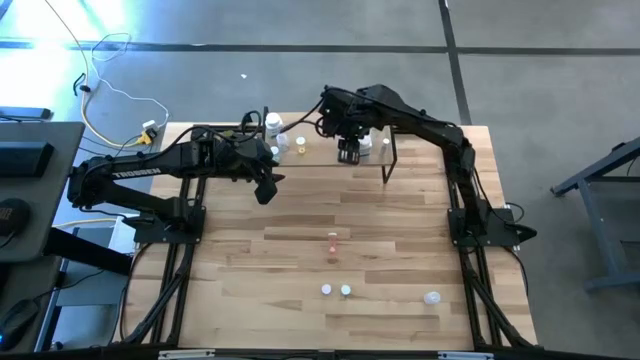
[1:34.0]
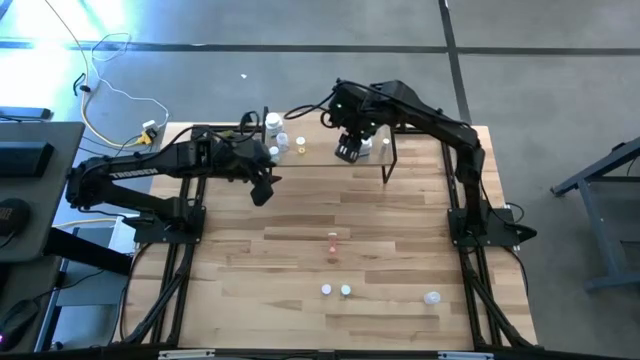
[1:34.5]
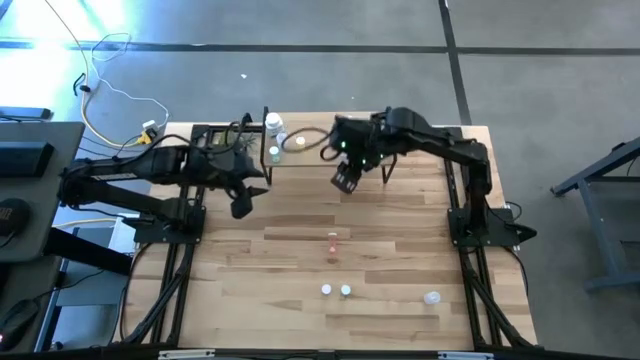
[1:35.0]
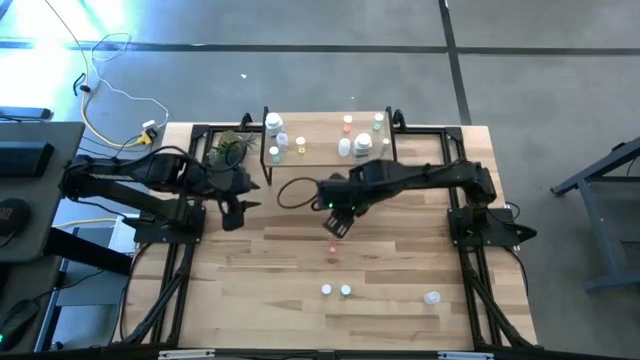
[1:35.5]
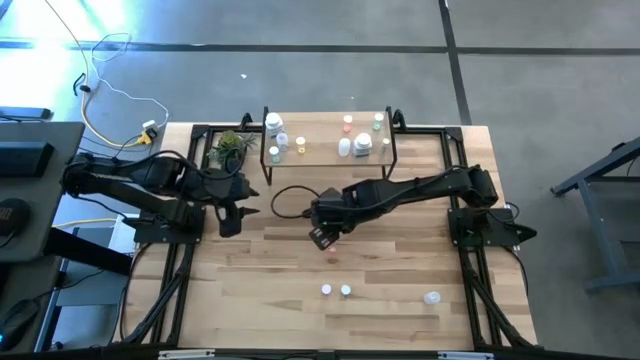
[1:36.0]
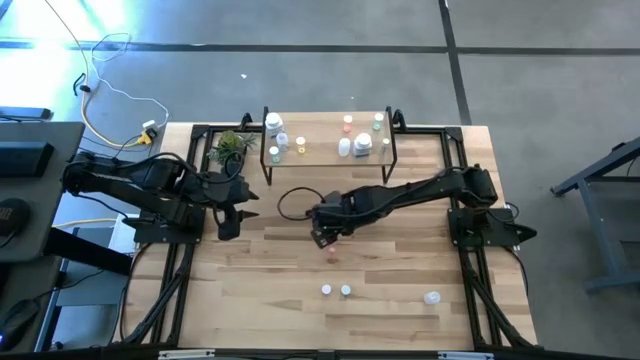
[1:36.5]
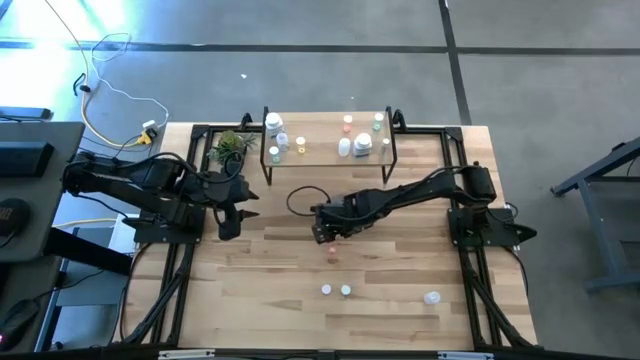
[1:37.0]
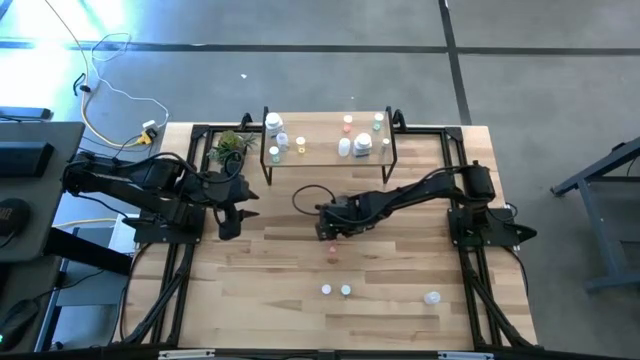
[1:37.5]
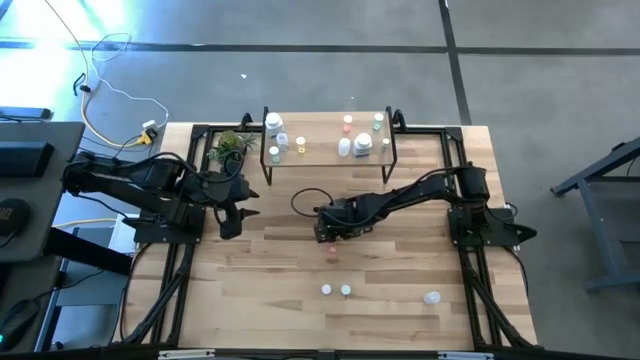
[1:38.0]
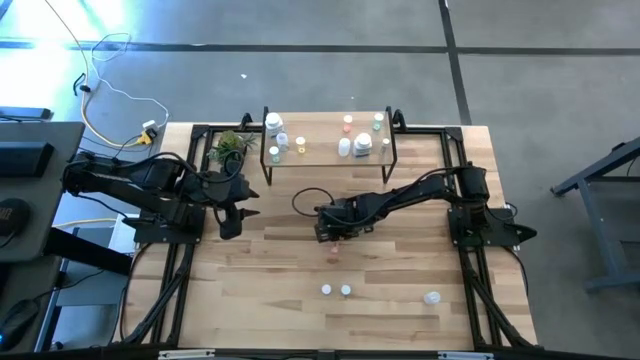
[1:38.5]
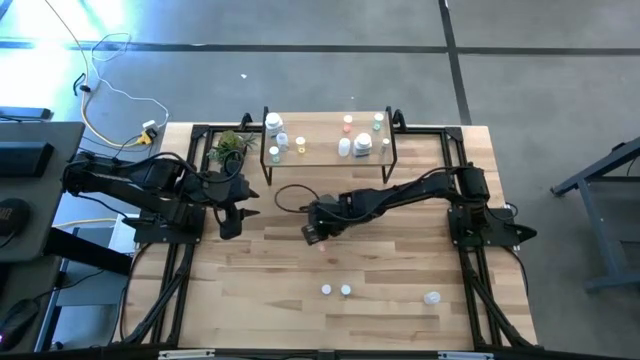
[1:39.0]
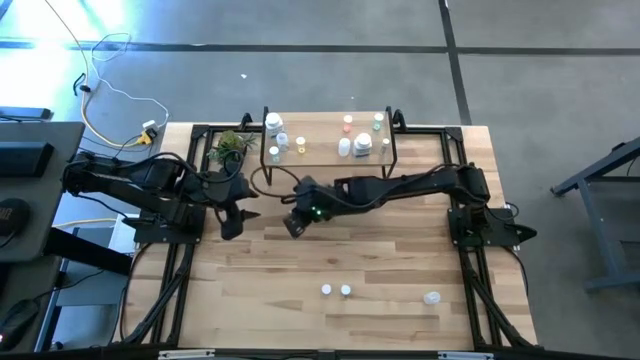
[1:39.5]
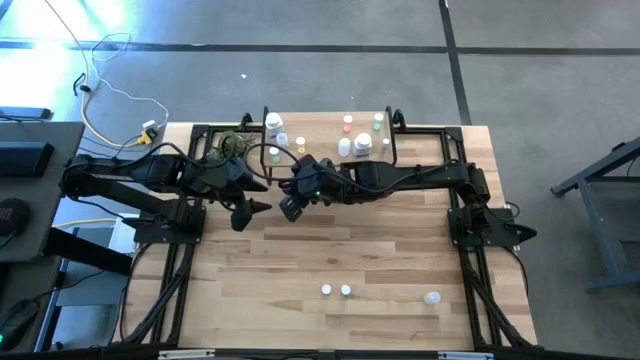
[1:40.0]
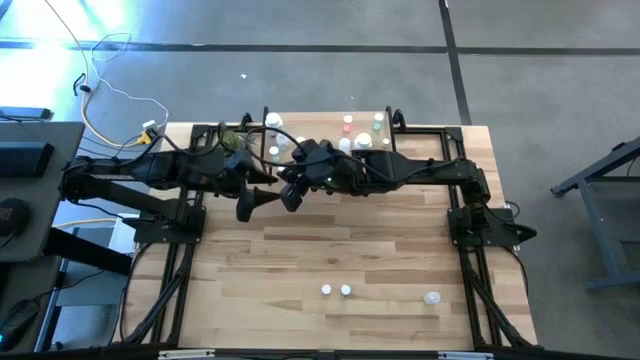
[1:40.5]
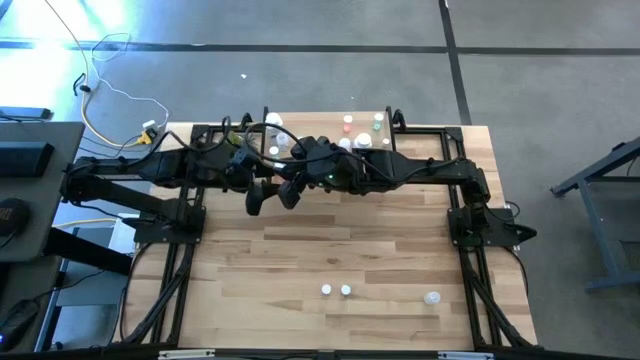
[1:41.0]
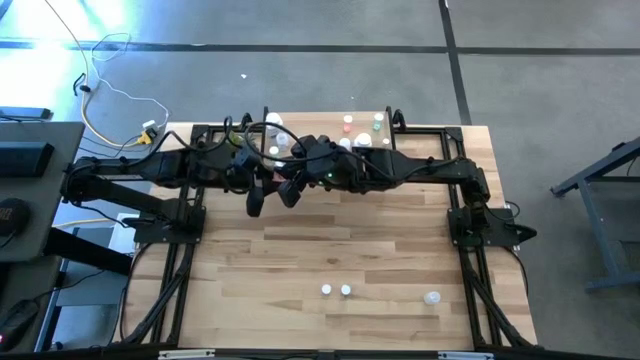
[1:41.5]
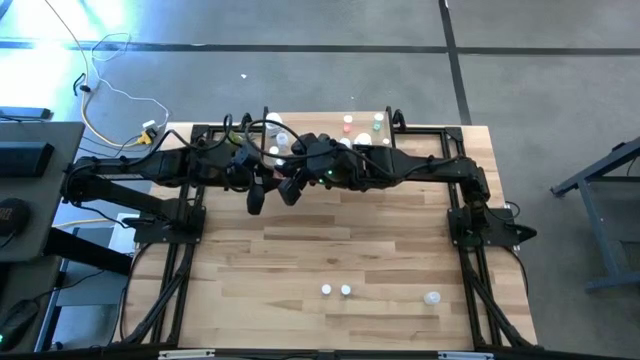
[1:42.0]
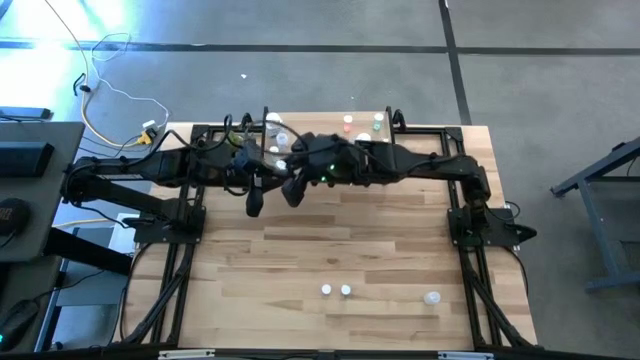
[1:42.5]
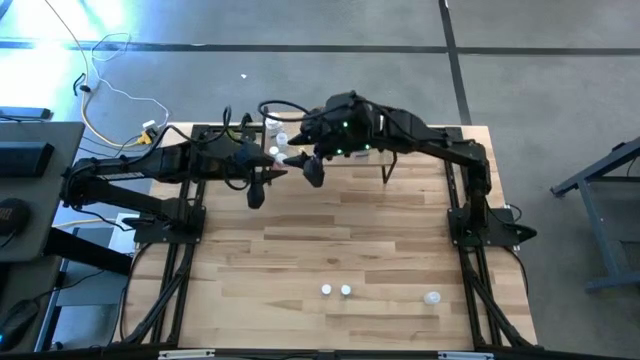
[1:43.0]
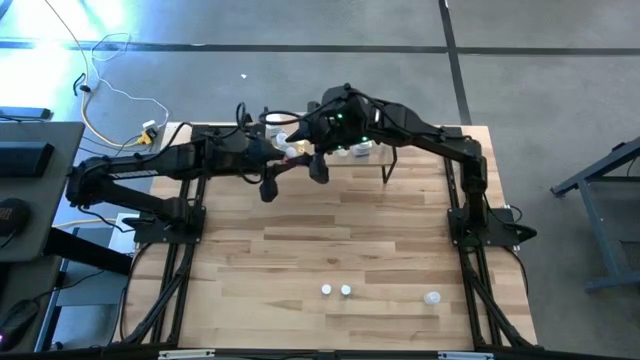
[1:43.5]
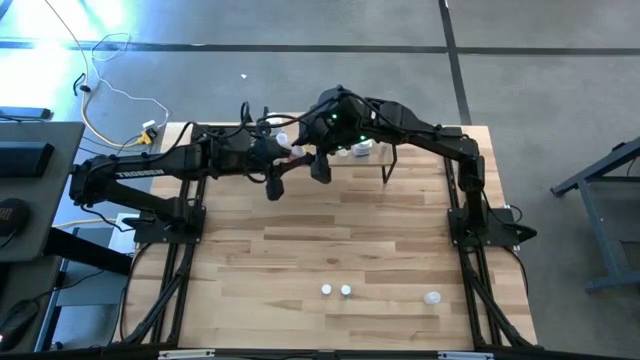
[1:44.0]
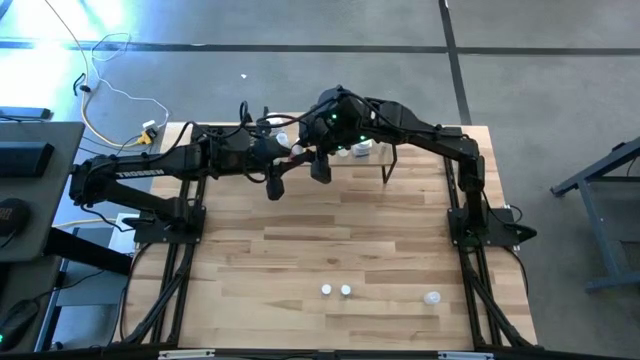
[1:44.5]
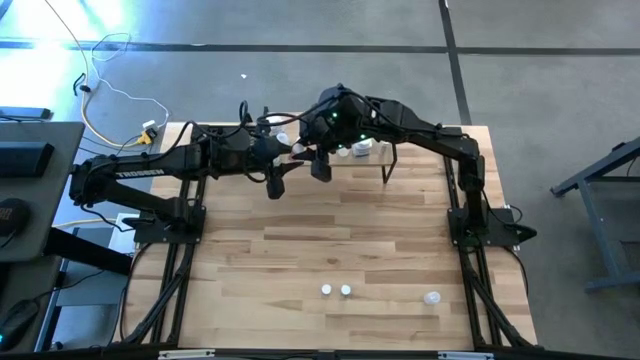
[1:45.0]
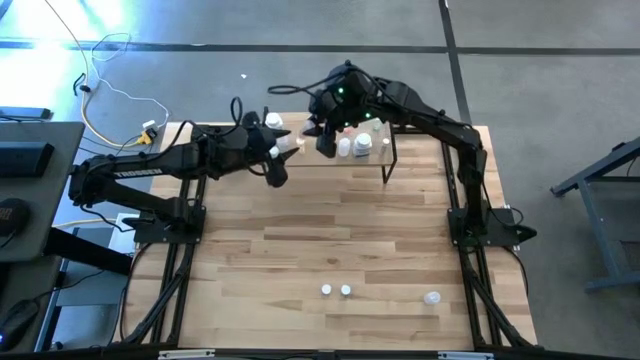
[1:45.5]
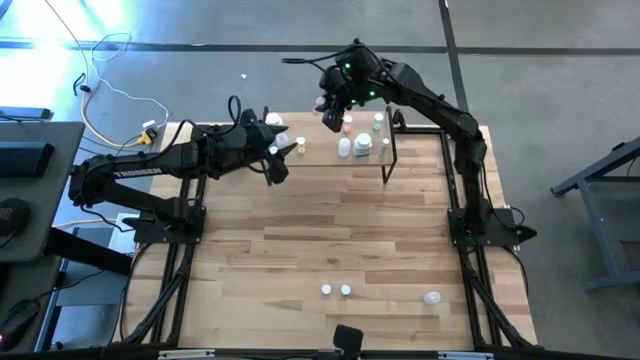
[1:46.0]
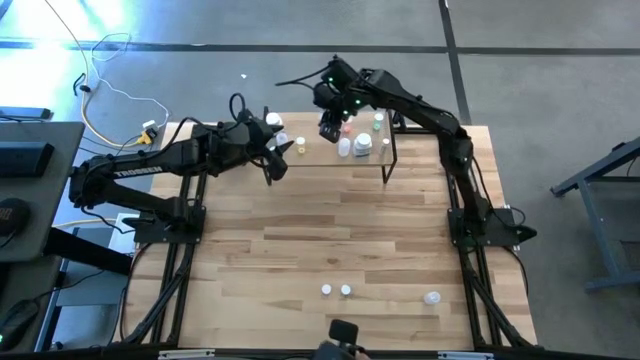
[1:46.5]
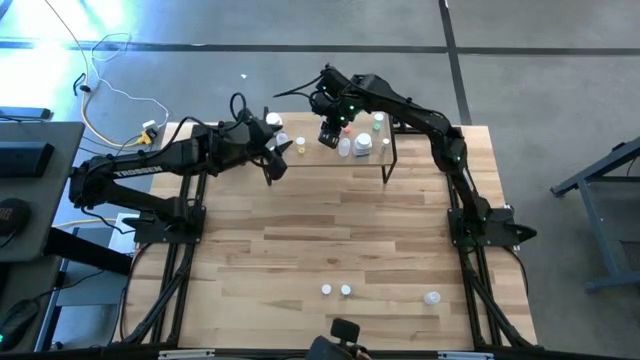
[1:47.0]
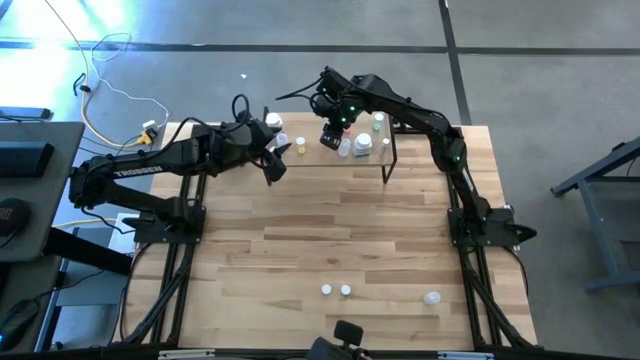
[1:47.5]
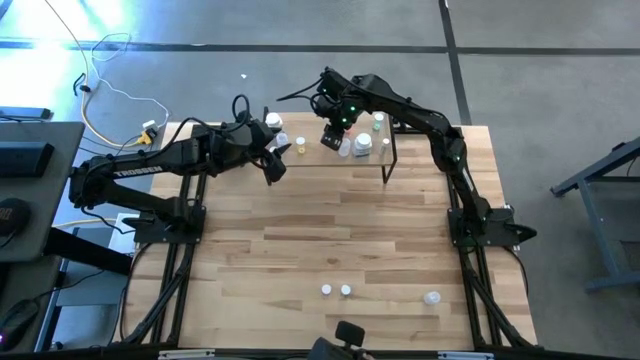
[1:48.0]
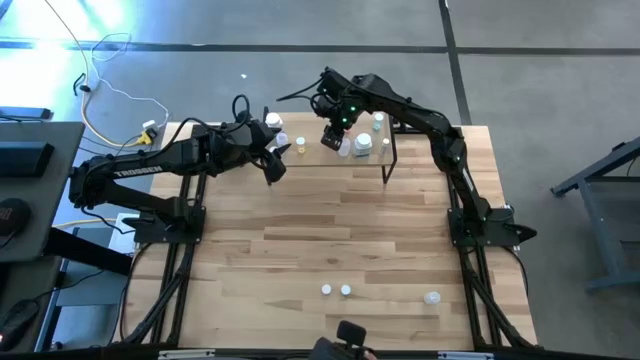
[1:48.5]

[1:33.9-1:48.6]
Task: Pick and place medicine bottles onto shelf by color
Put the pink pill bottle on the shelf

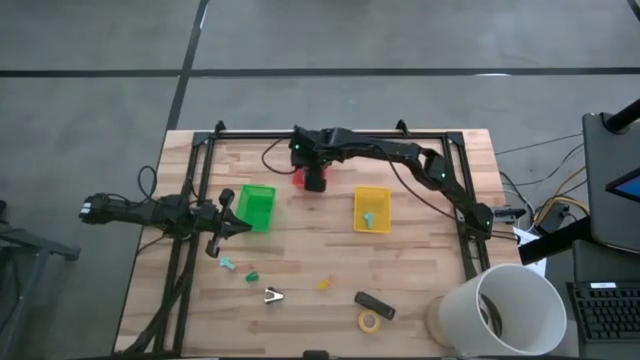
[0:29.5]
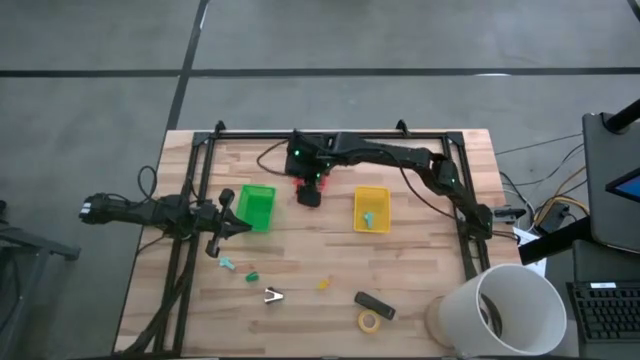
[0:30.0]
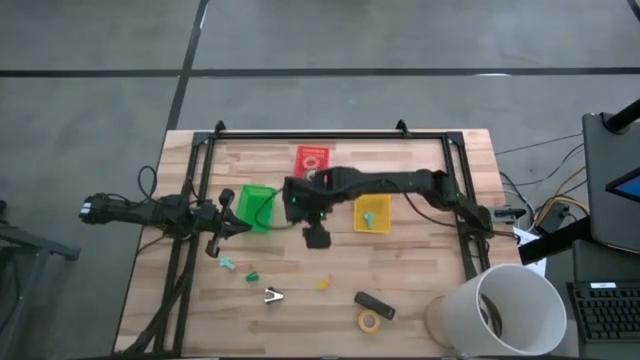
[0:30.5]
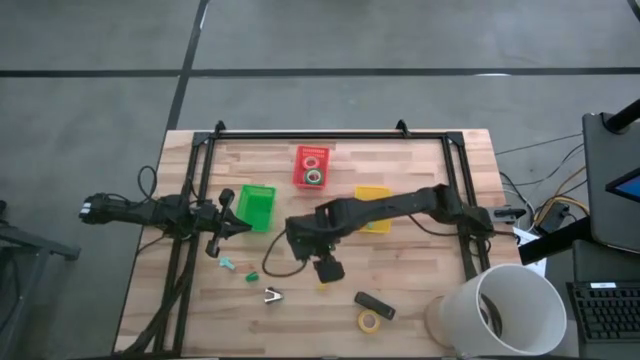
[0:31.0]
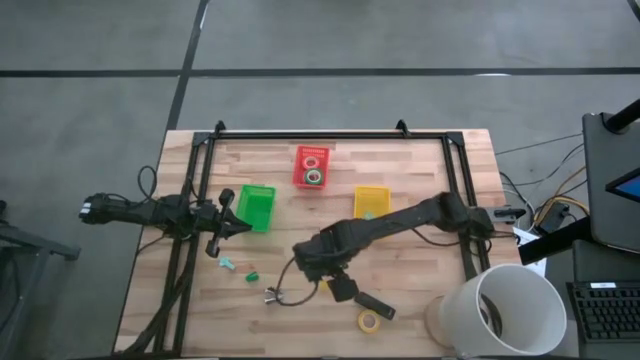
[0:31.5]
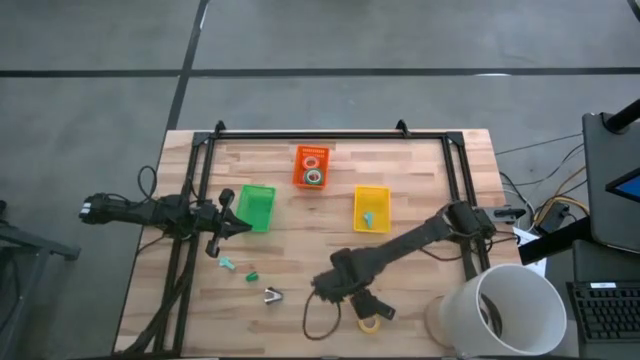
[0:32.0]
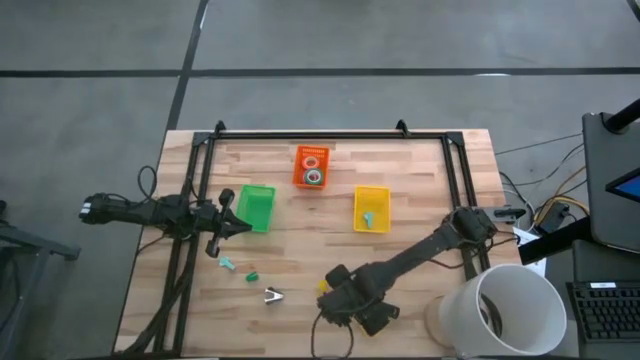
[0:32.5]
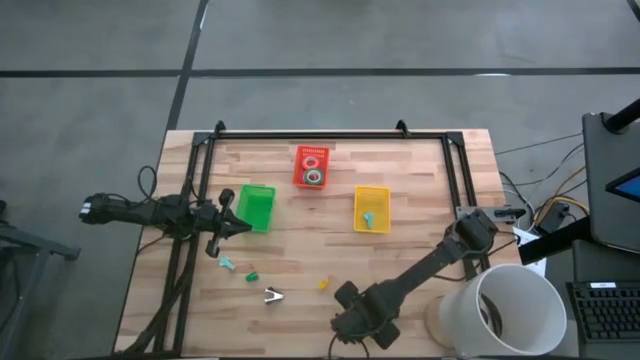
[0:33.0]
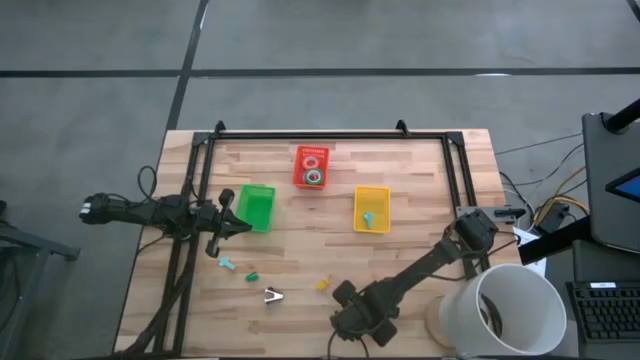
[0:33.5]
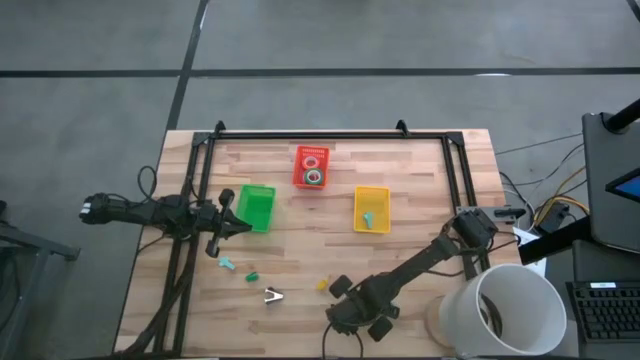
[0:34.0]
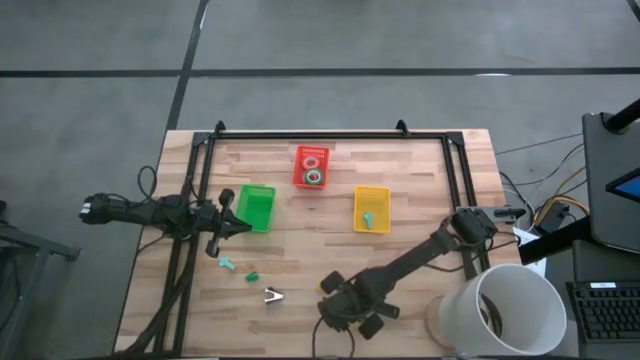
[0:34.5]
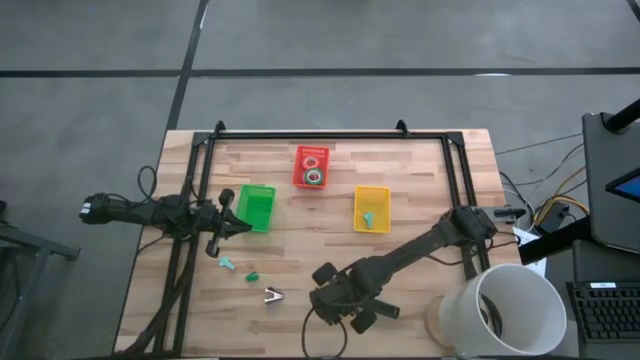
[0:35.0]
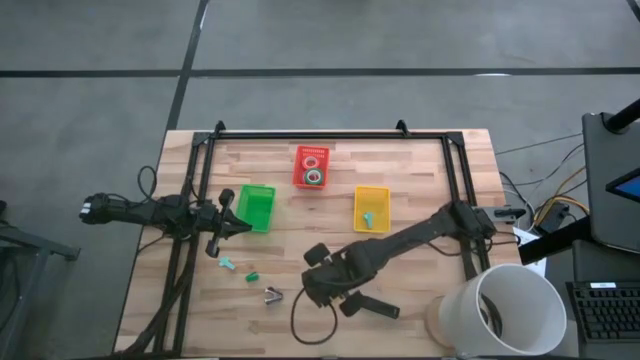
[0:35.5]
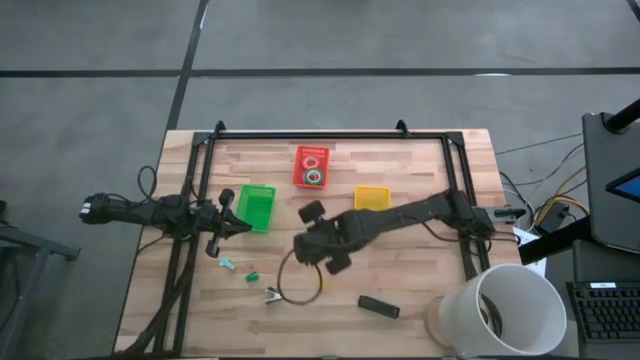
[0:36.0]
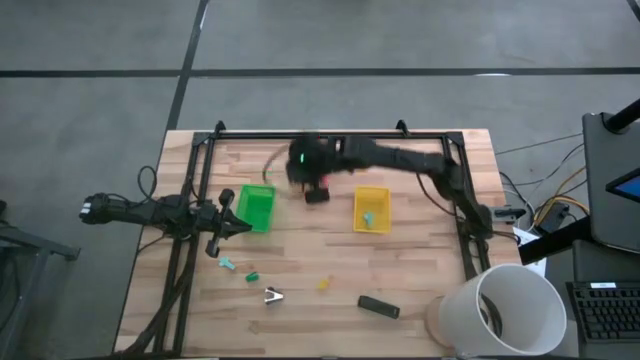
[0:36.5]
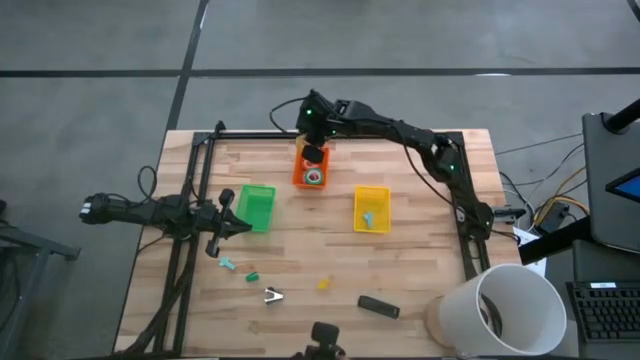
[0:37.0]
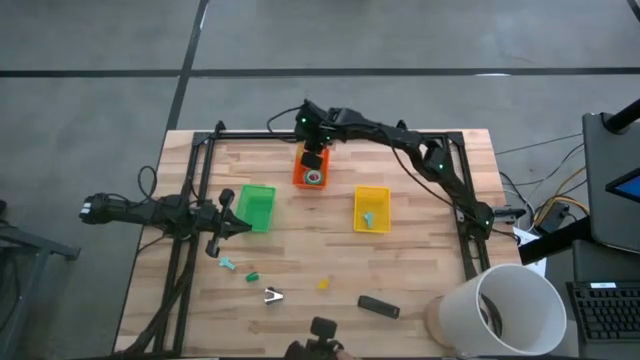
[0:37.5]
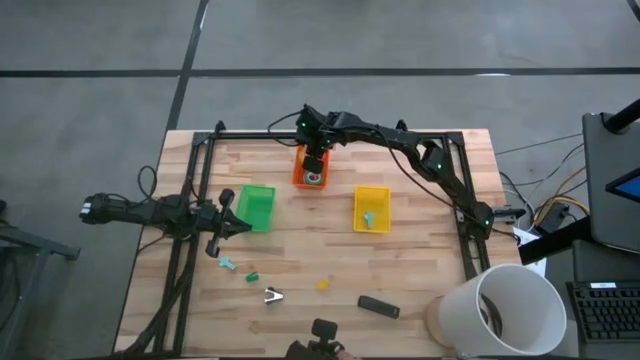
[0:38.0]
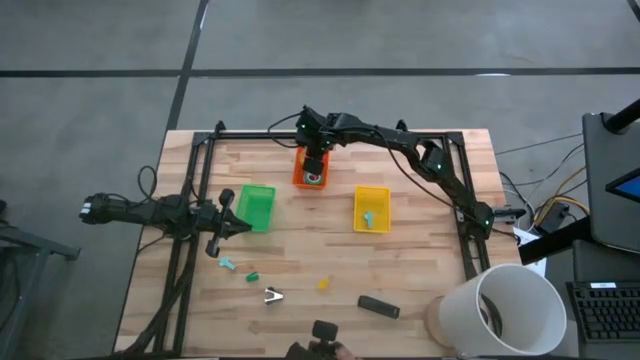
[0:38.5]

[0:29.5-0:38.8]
Task: Pick and place Stapler, Stapler remover, tape
Put the yellow tape into the orange basket
